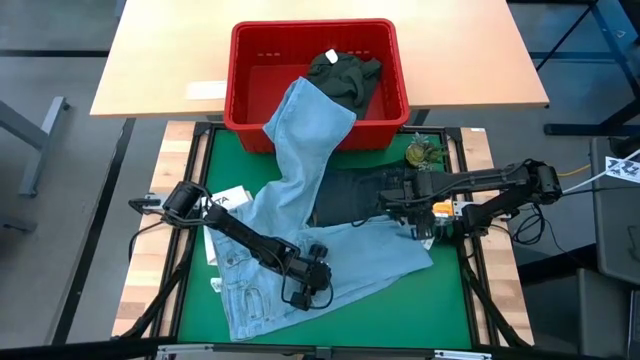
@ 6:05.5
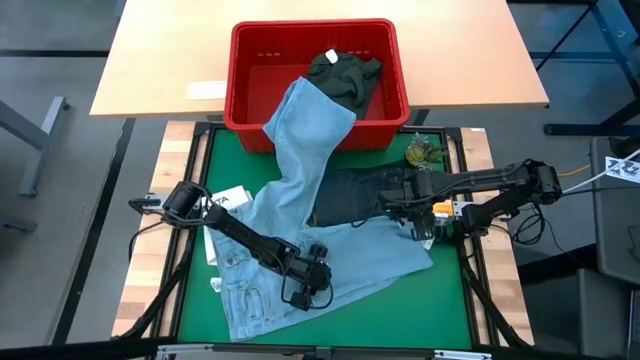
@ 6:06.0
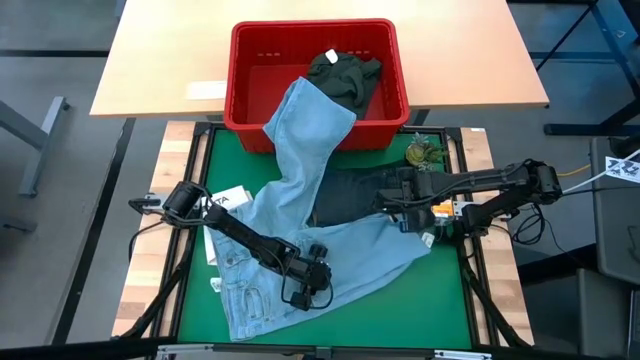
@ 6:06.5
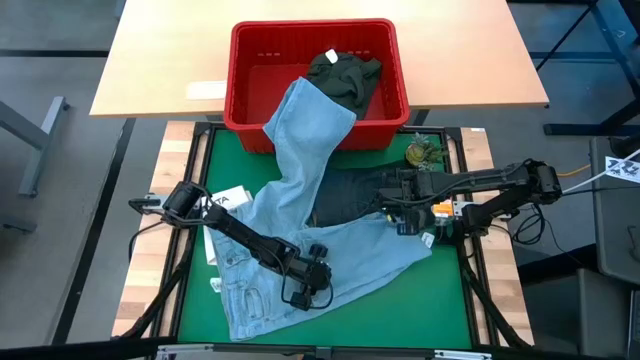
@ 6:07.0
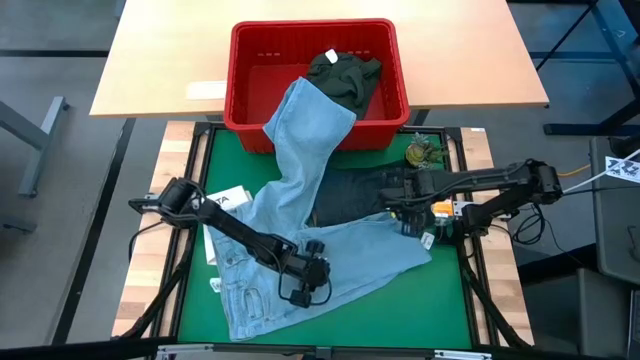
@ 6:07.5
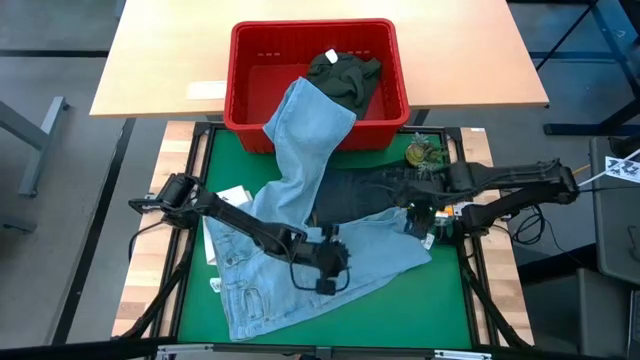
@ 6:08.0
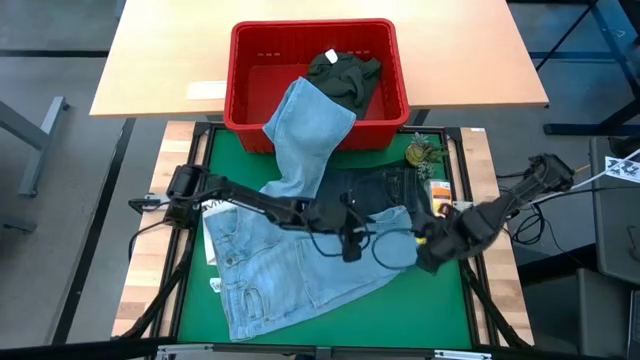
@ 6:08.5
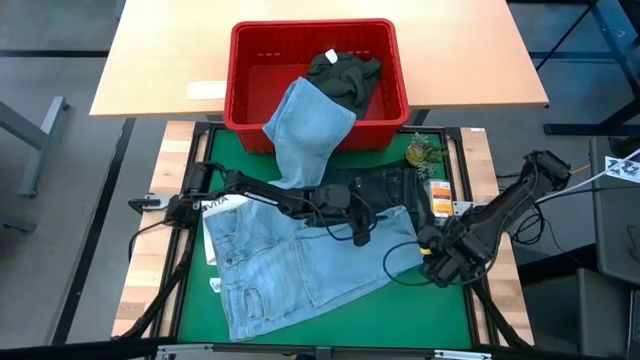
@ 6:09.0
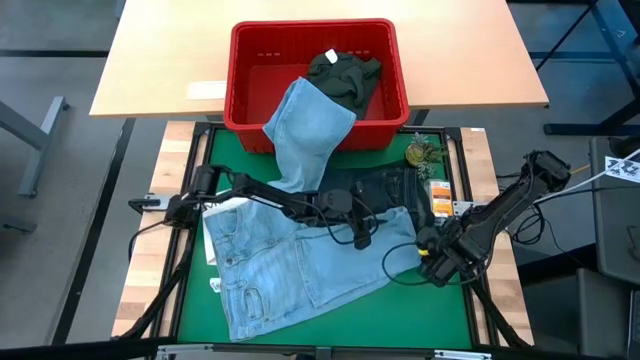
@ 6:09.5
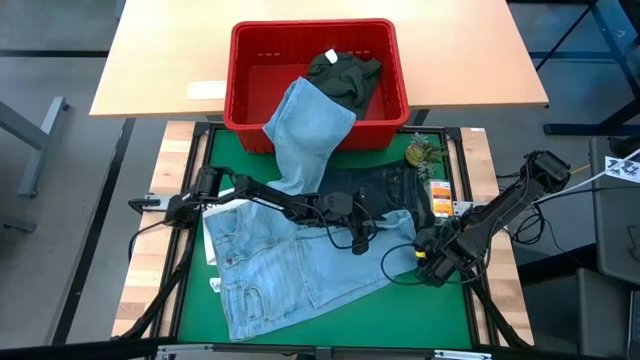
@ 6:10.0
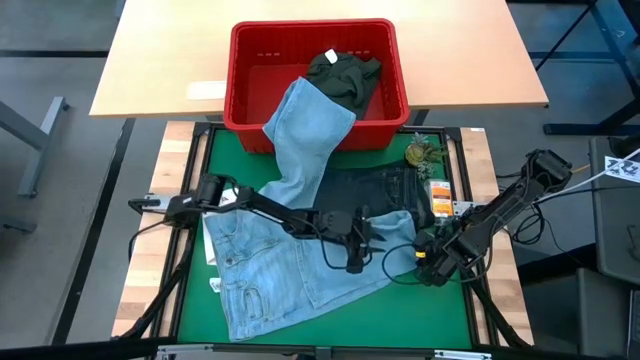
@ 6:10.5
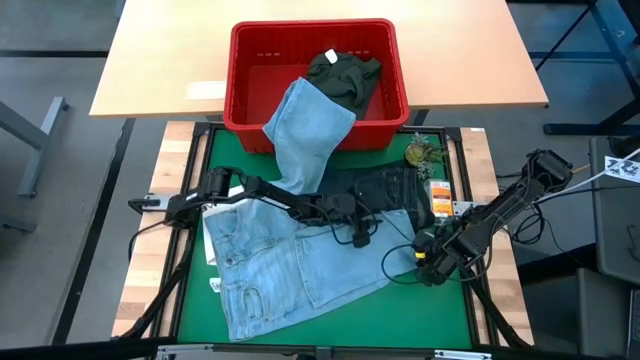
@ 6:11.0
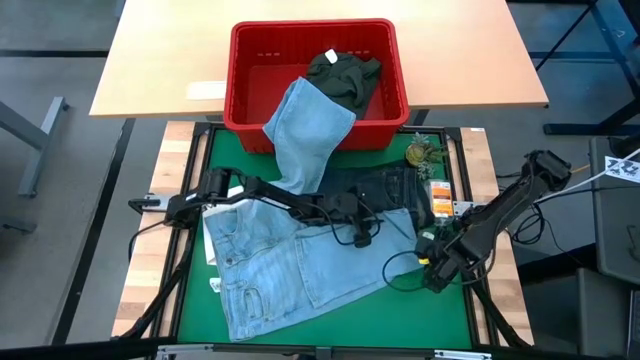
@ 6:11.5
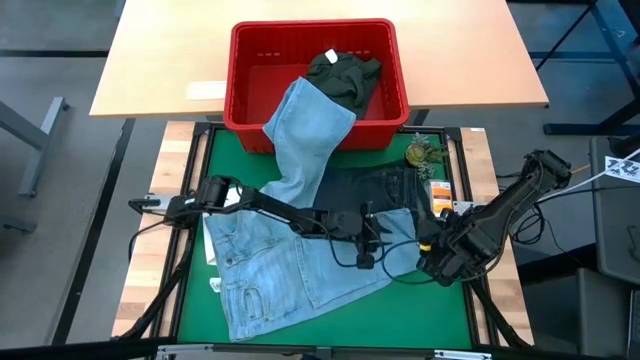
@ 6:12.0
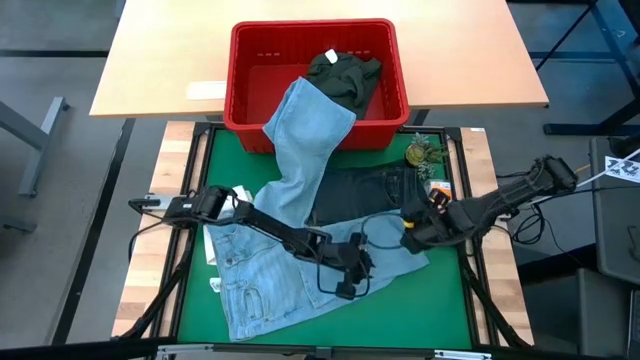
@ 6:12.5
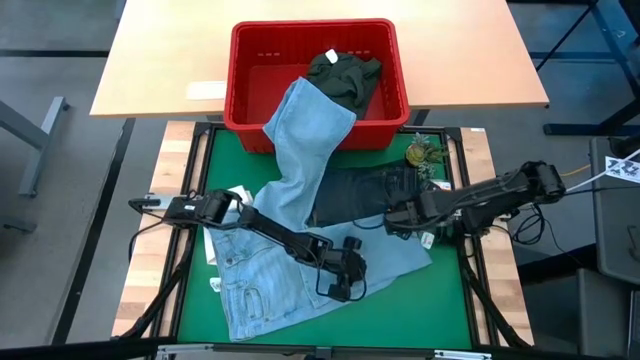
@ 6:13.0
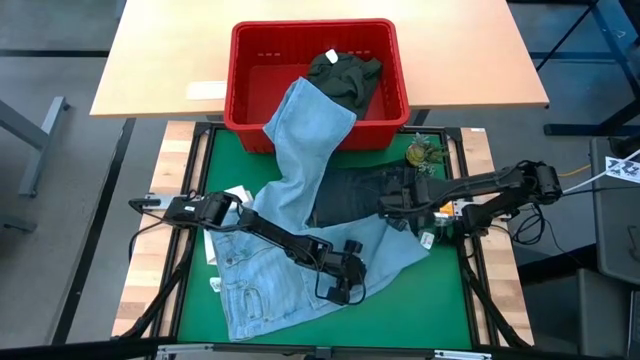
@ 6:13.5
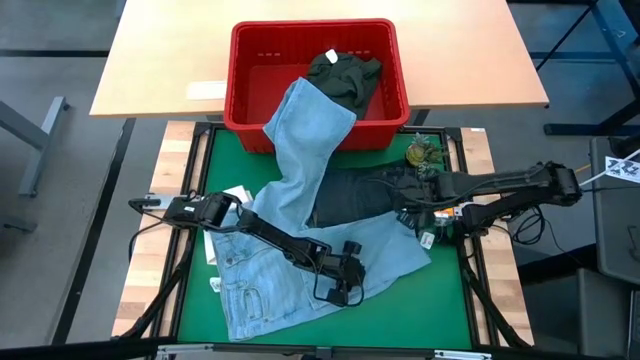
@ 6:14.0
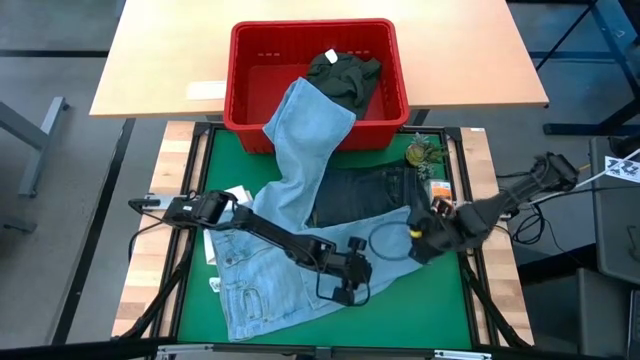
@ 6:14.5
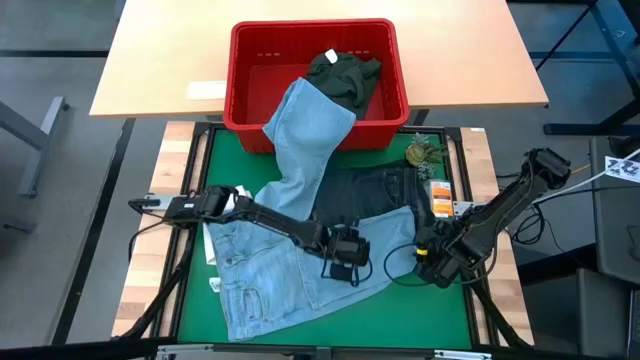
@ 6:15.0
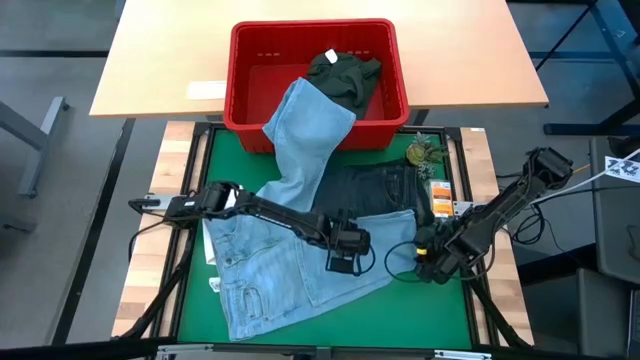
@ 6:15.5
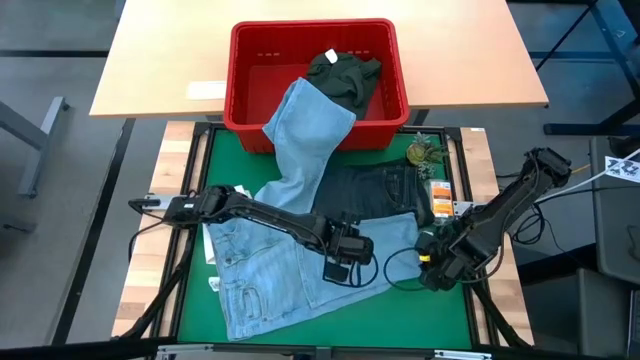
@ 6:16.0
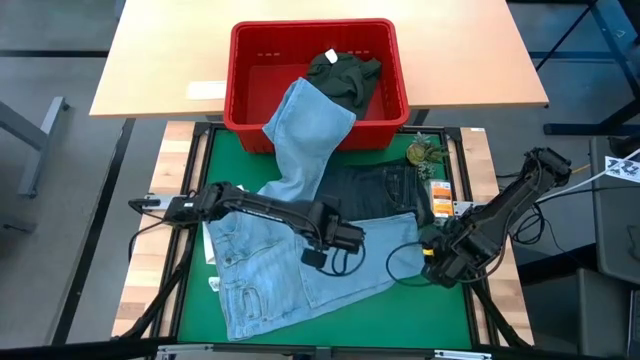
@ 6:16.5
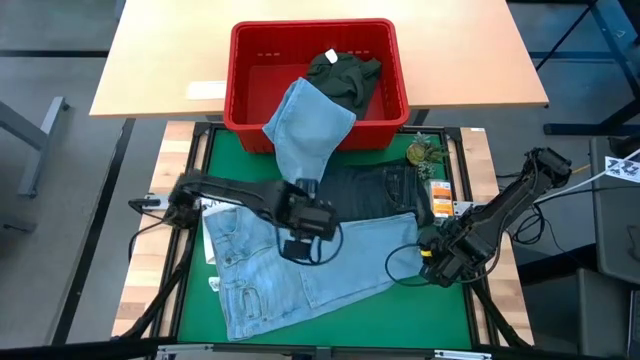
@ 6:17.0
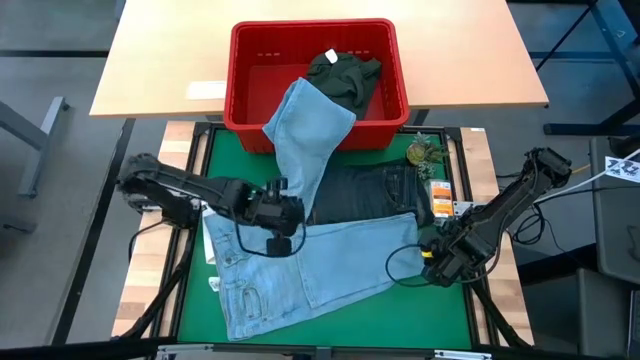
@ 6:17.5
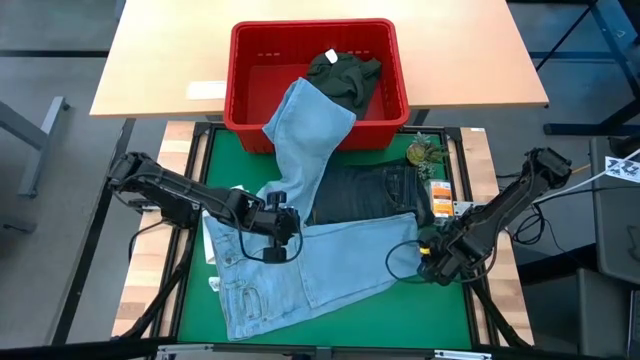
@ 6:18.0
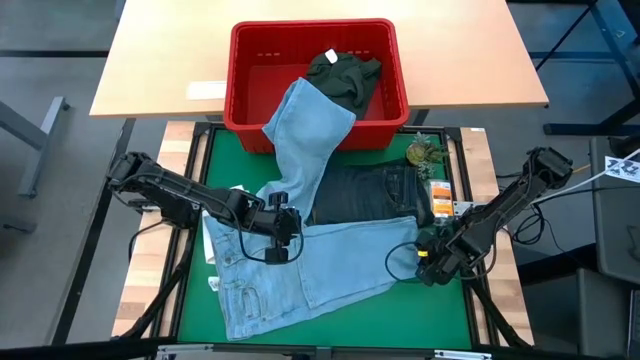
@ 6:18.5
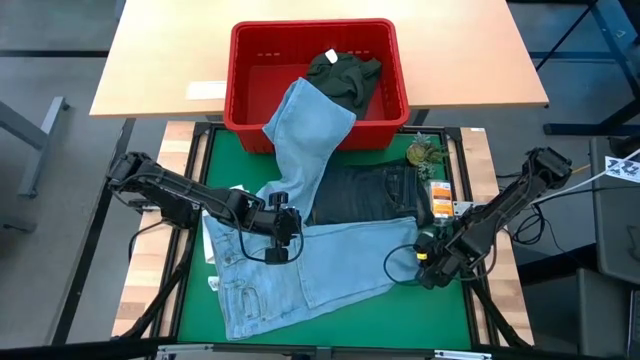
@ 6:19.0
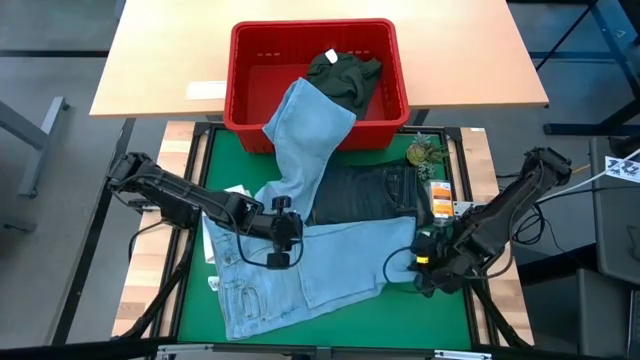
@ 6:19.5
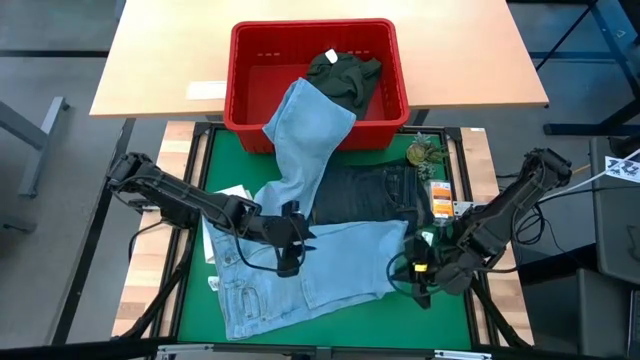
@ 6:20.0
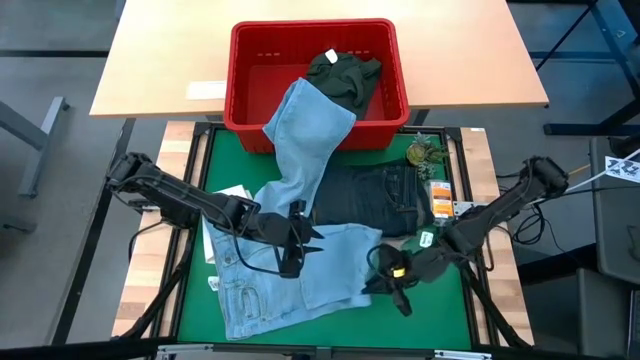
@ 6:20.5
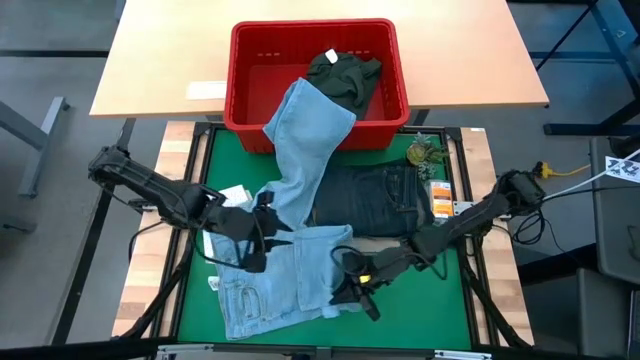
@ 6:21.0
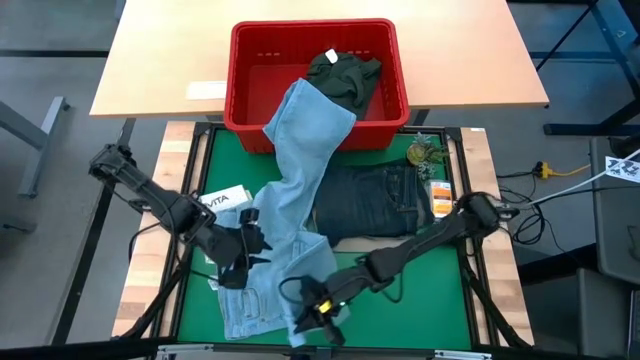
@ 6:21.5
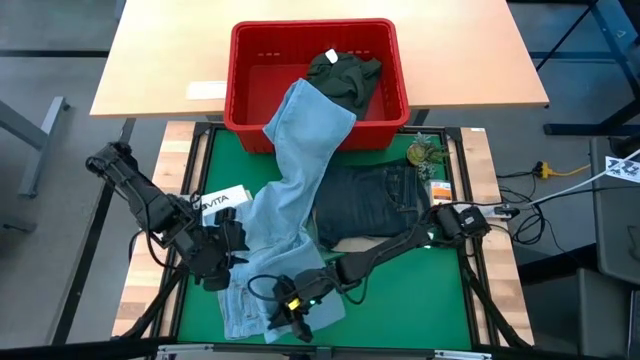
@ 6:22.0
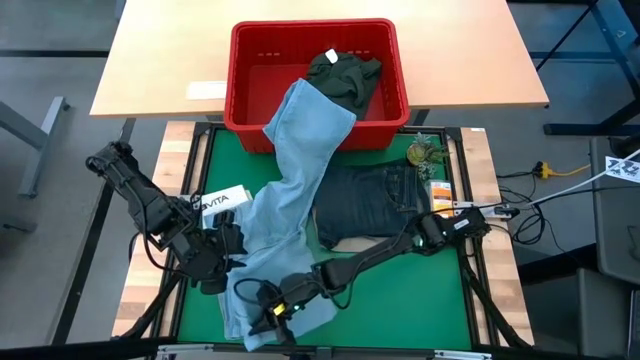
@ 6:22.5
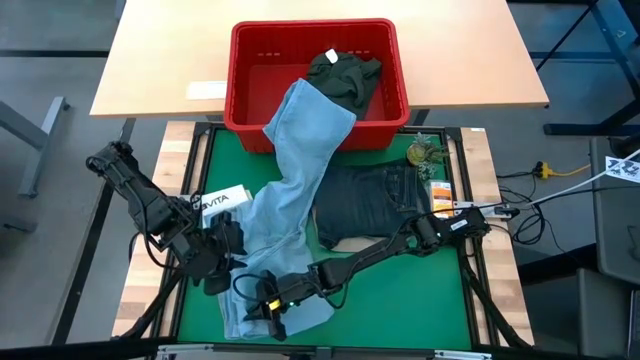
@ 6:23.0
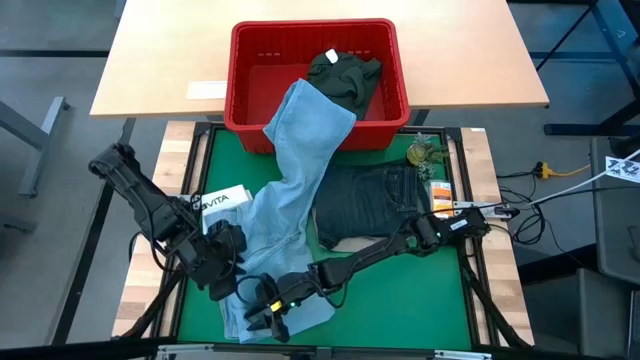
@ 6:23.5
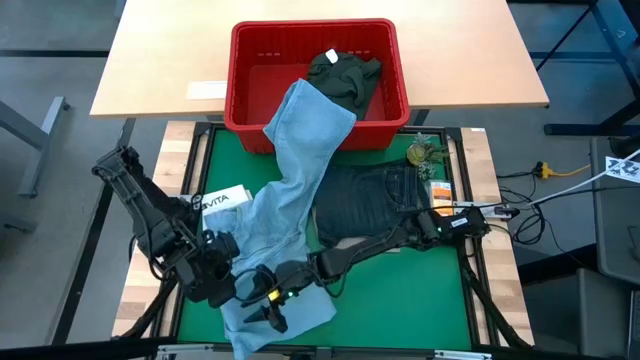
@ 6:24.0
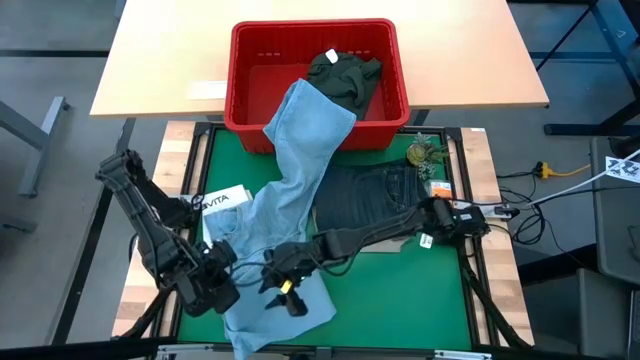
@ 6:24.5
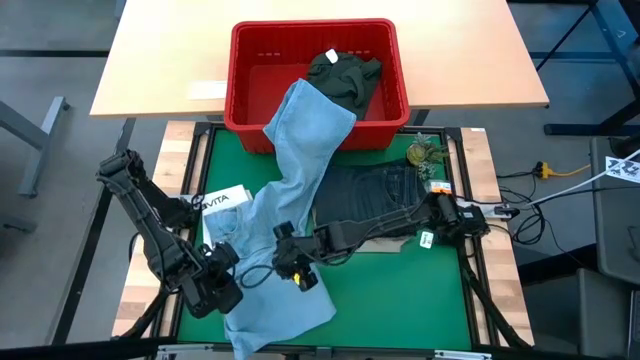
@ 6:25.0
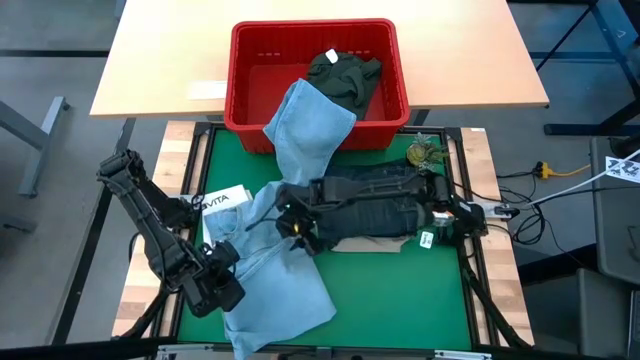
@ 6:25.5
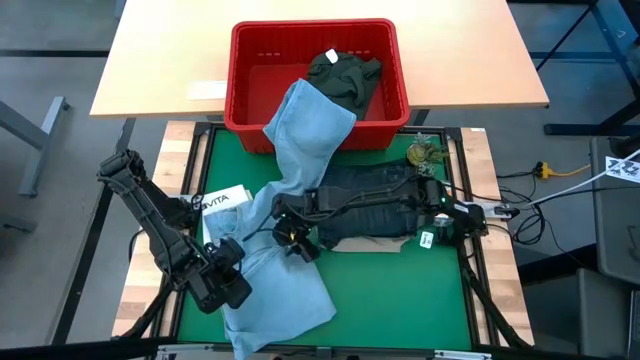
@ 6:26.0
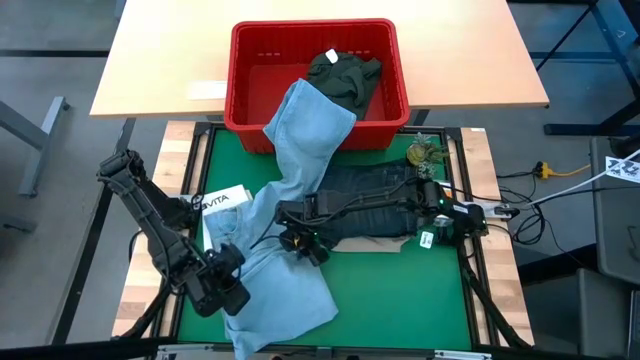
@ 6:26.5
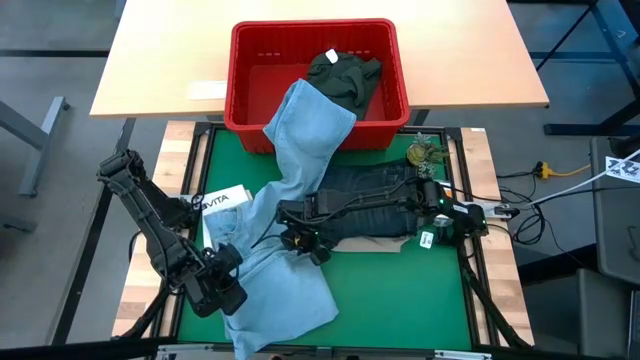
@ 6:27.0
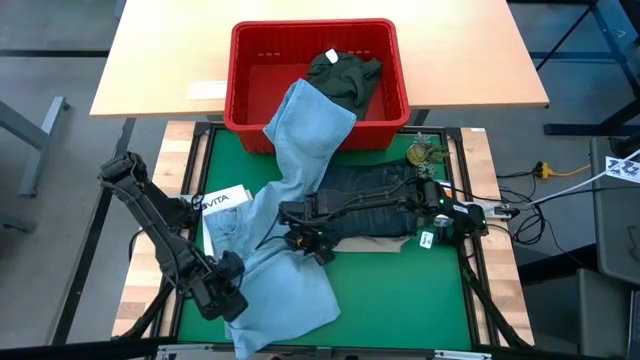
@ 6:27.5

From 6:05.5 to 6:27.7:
Task: Fold Laundry from Bin
Fold the light blue jeans
